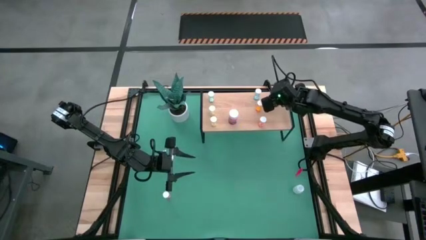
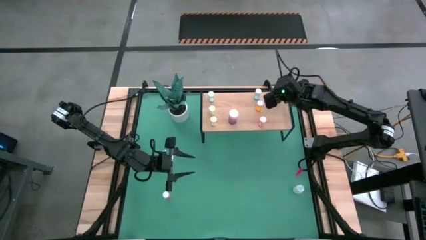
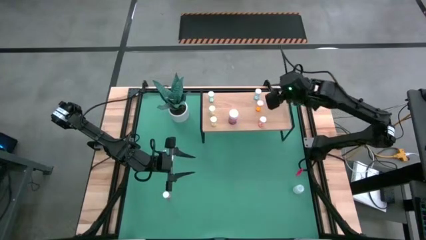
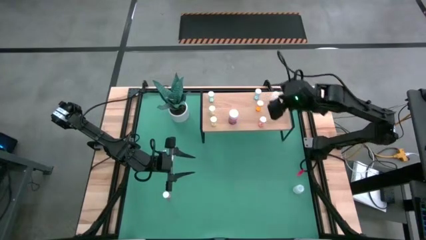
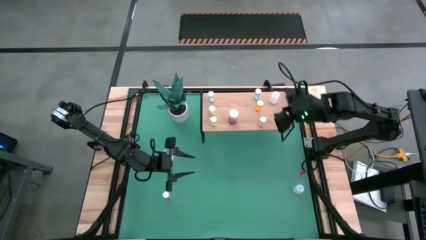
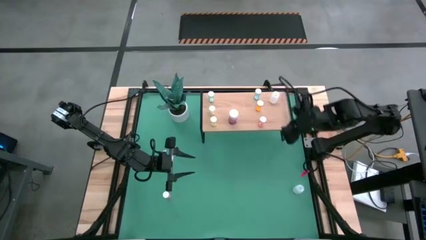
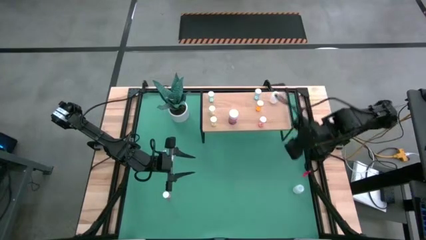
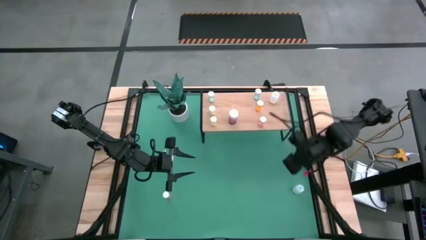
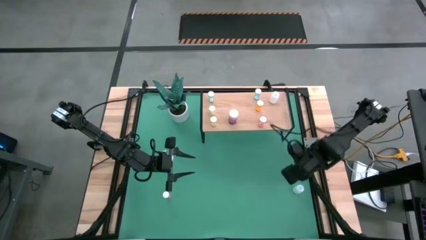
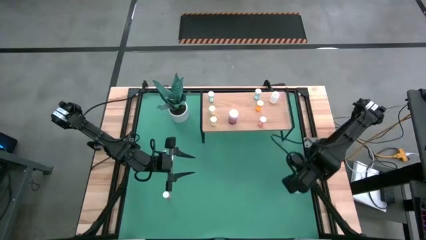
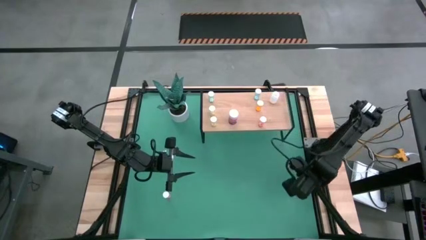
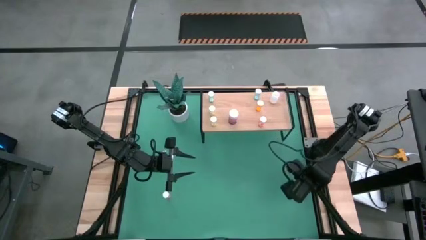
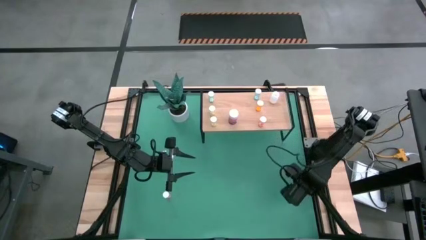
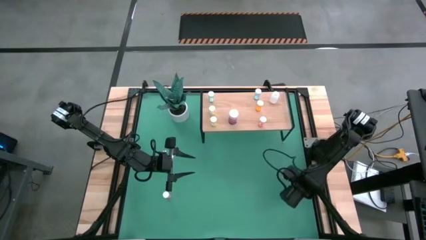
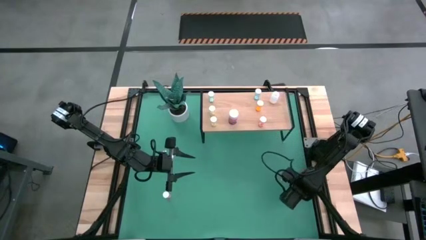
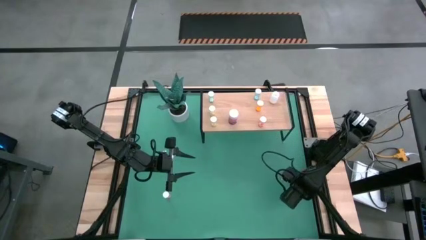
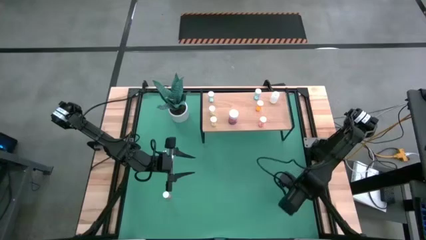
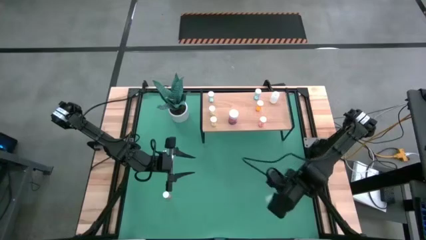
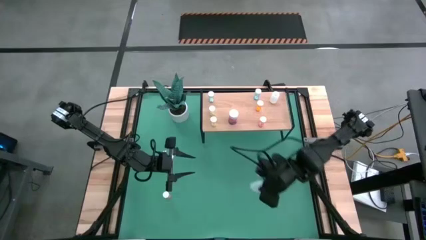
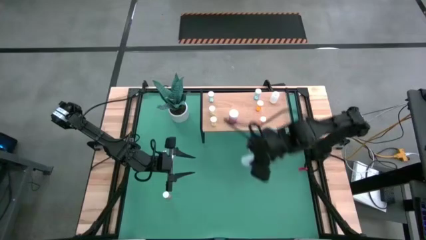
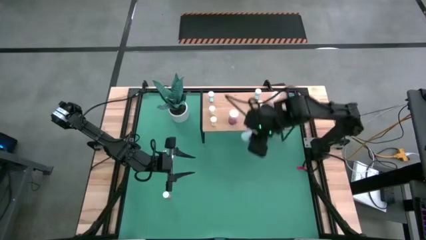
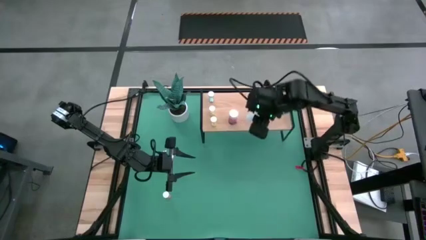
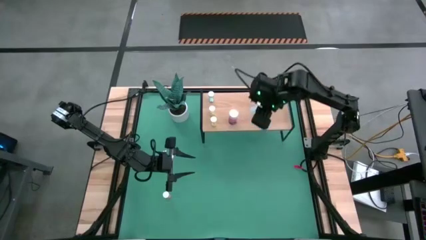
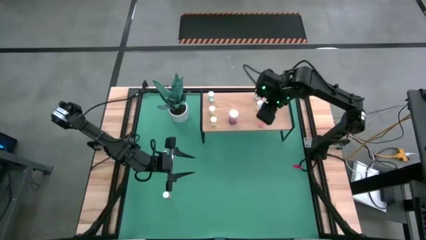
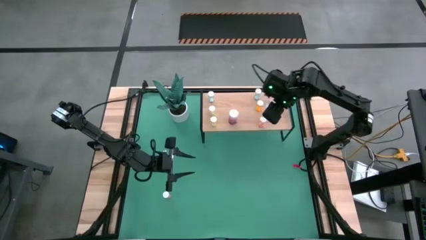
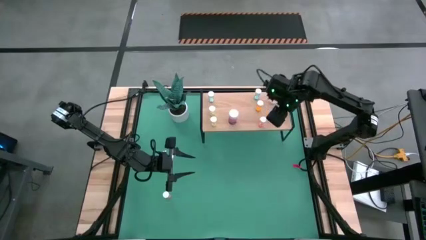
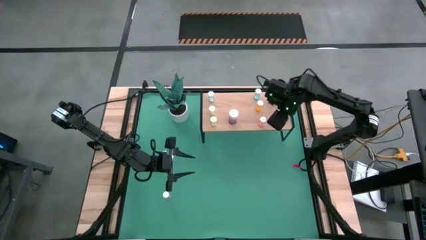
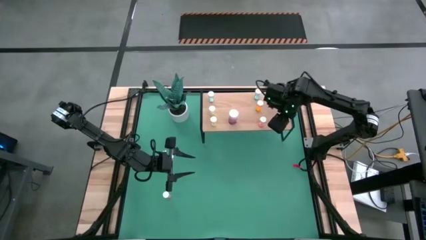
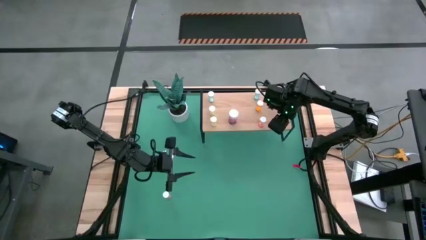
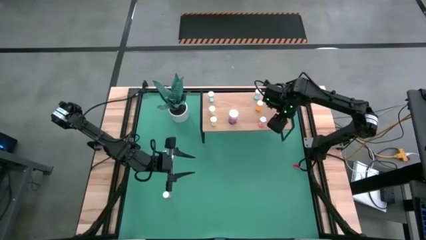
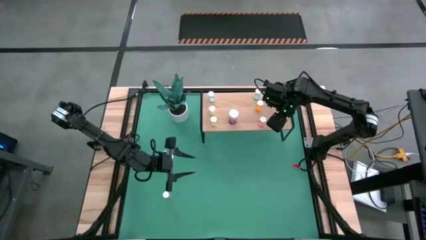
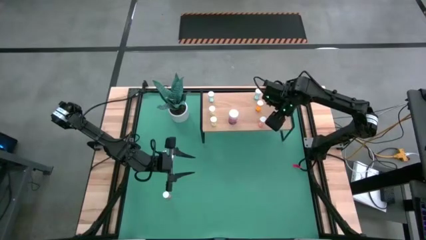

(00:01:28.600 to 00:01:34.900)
Task: Pick and place medicine bottles onto shelf by color
Put the white pill bottle on the shelf

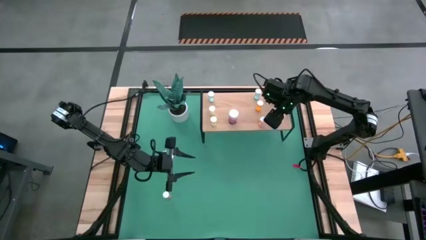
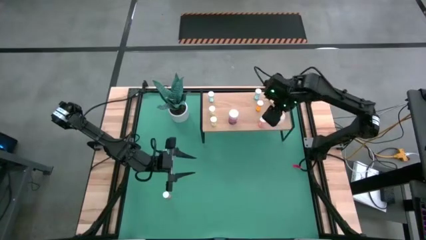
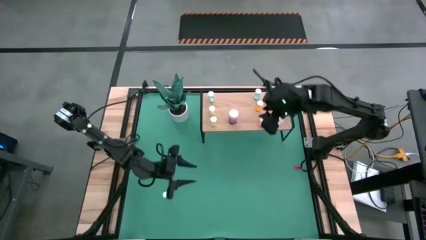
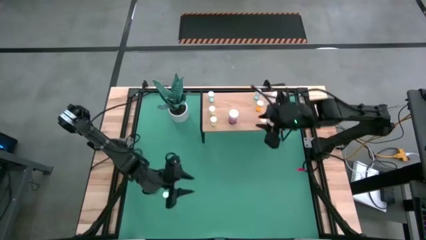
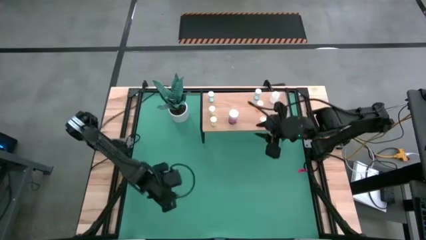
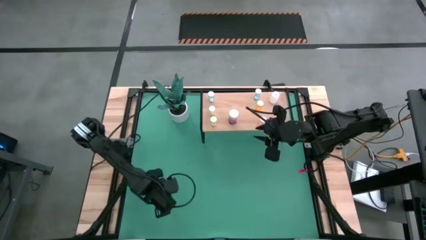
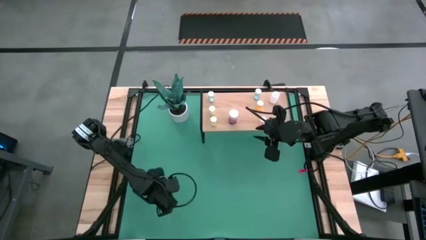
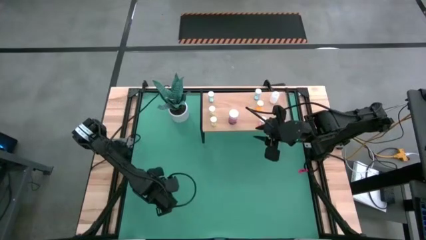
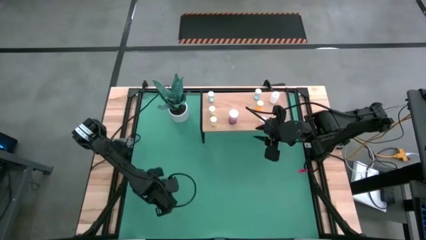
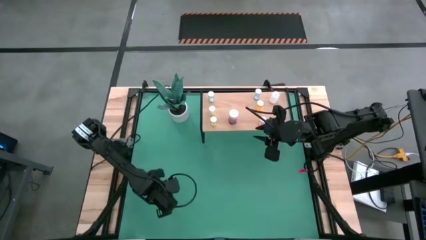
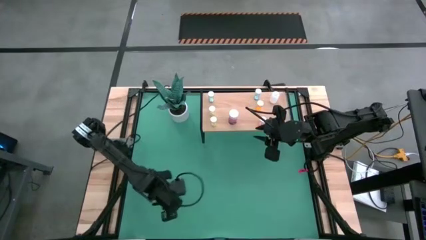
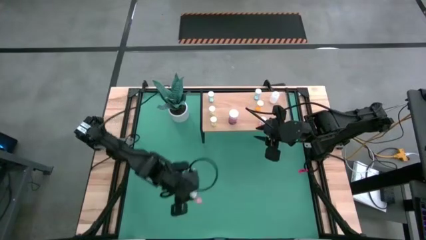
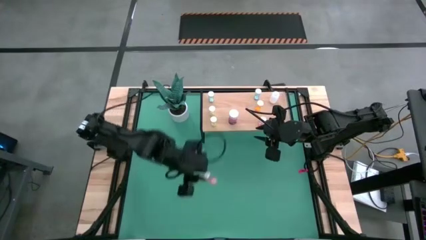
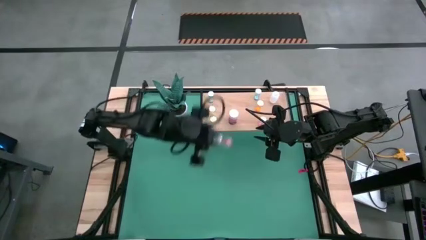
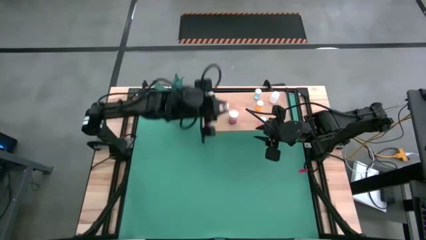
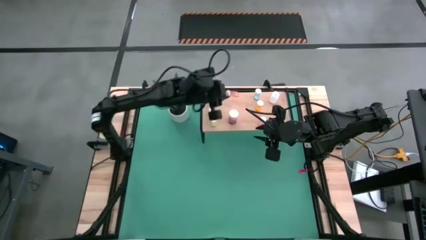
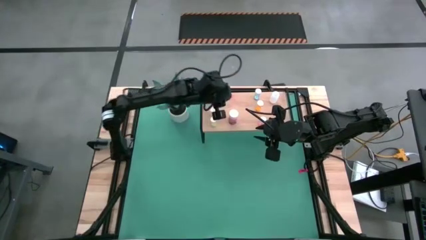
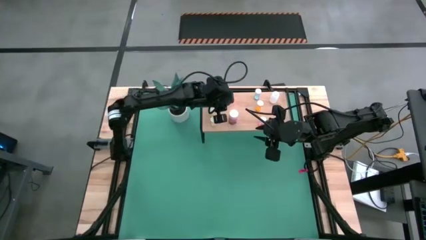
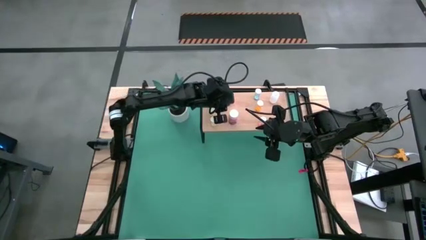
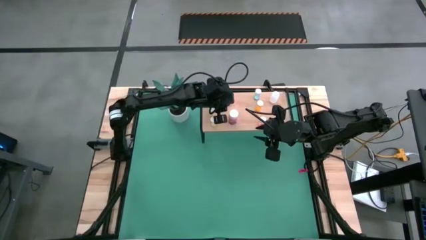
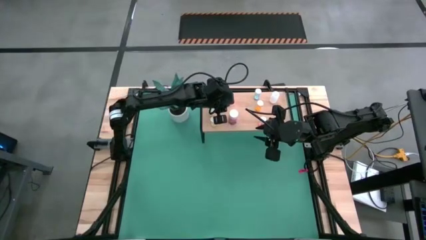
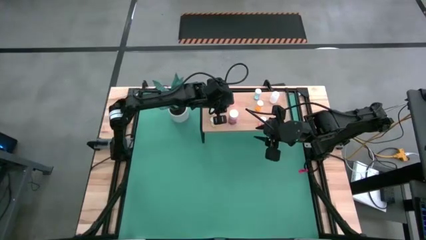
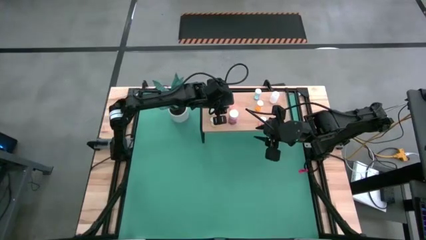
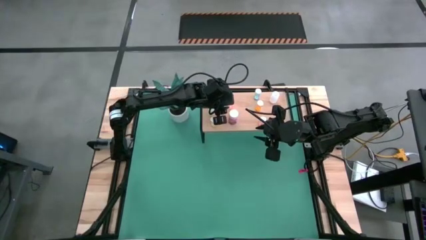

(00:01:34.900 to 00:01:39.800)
Put the light pink pill bottle on the shelf

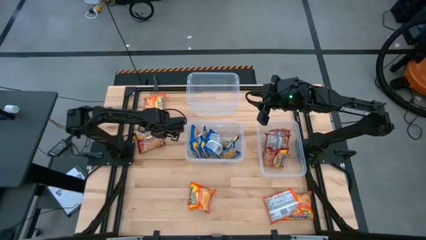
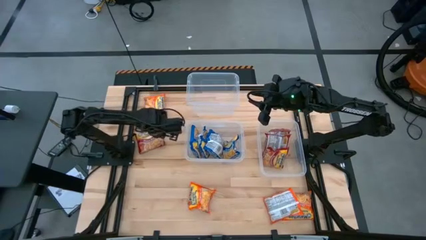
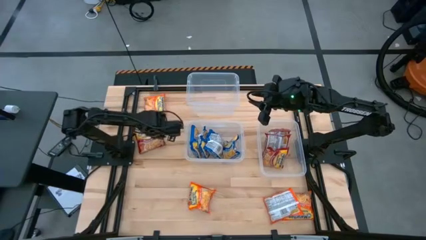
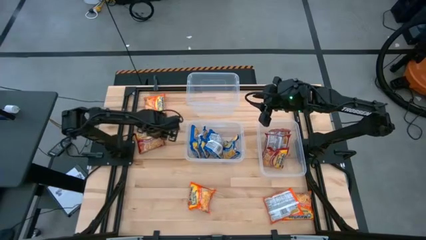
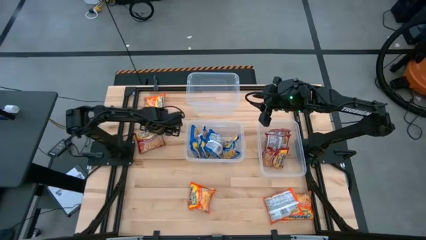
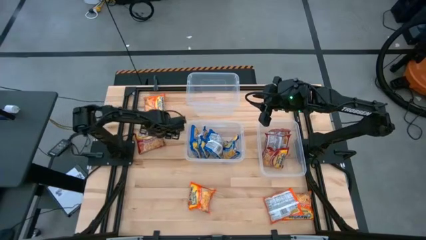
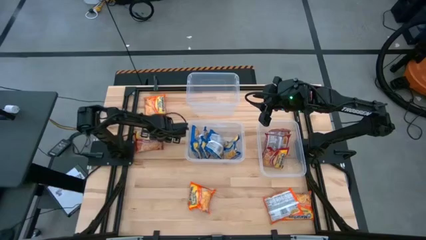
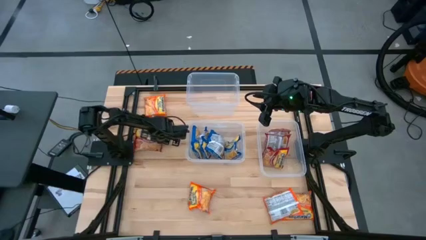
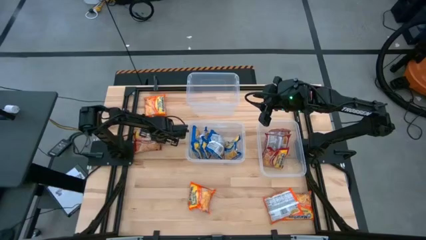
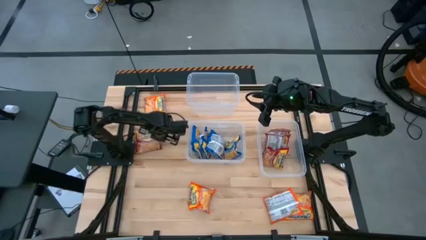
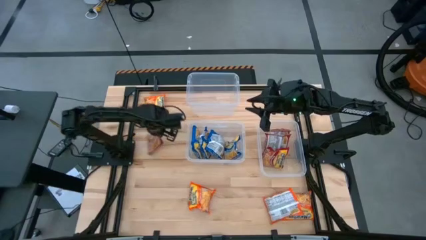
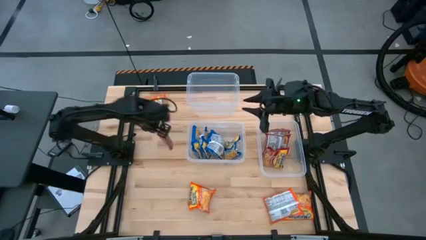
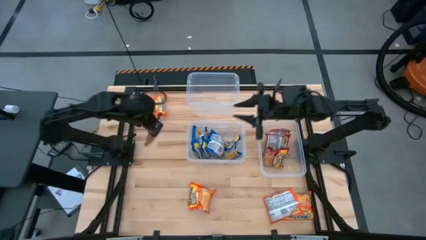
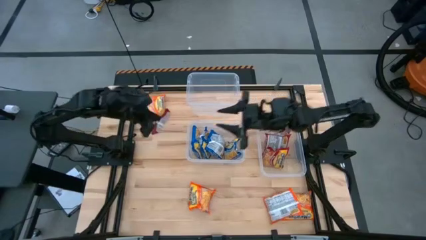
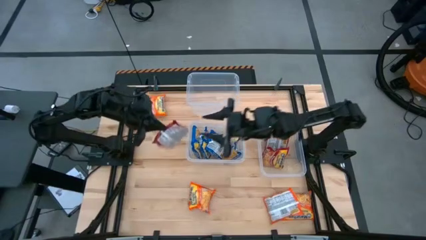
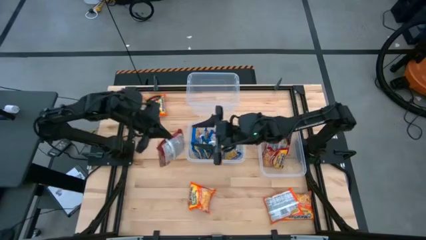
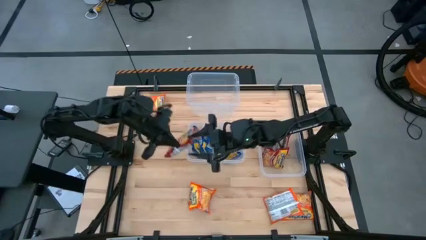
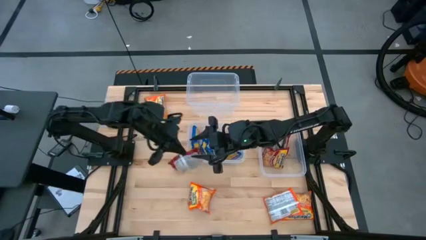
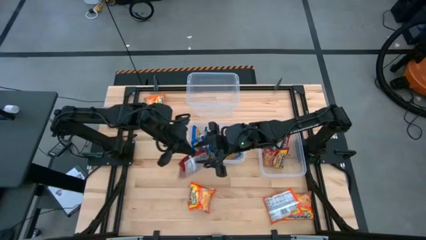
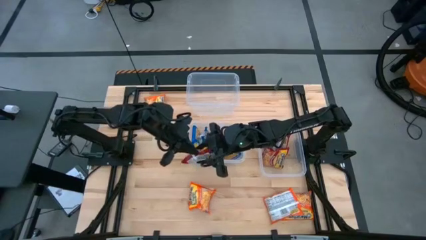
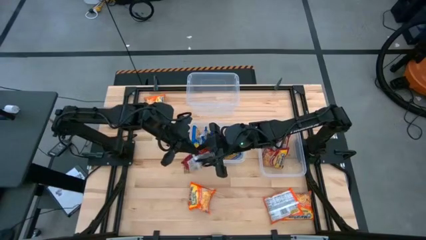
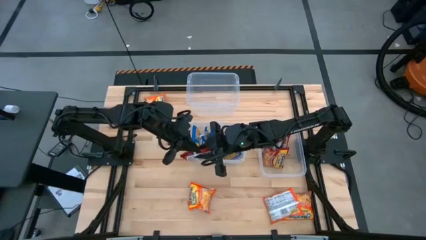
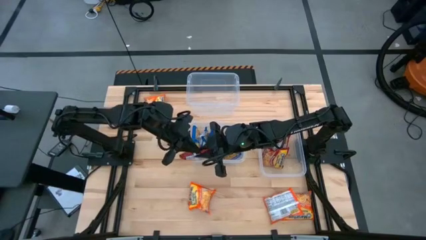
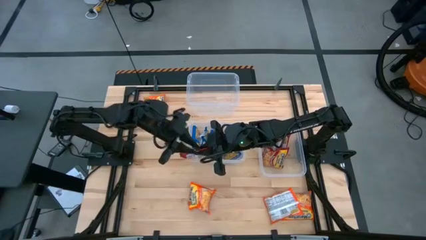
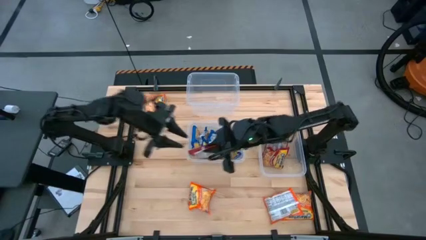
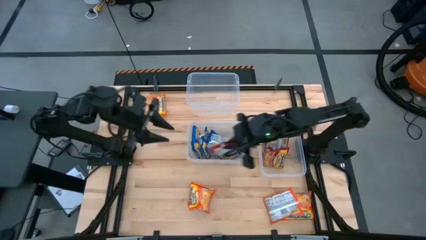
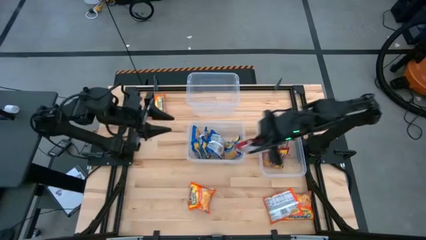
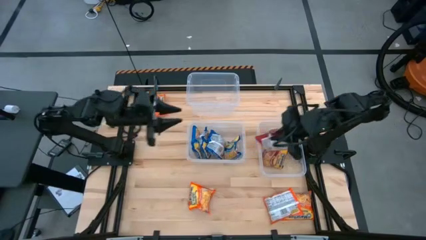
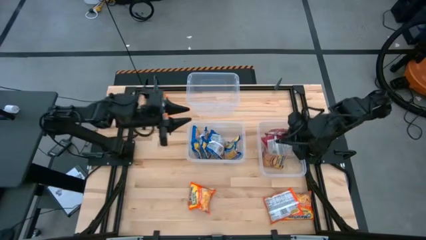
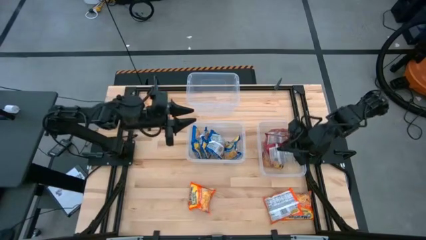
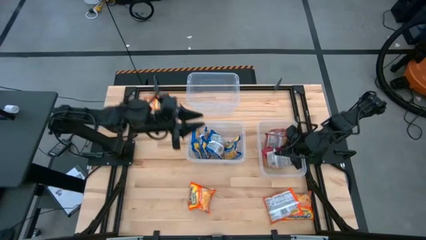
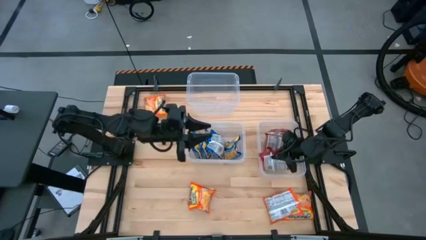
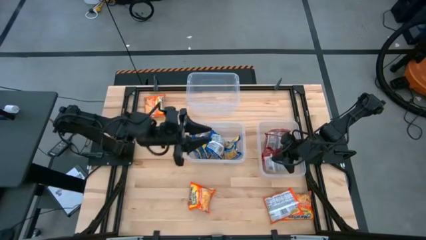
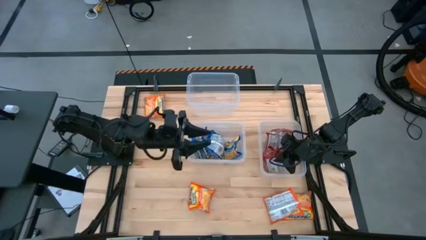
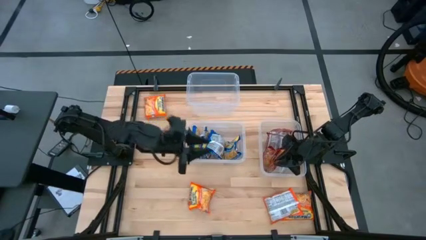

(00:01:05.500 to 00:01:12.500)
Task: Sort Maruchan noodles
Put the red noodle pack into the bottom right transparent bin
